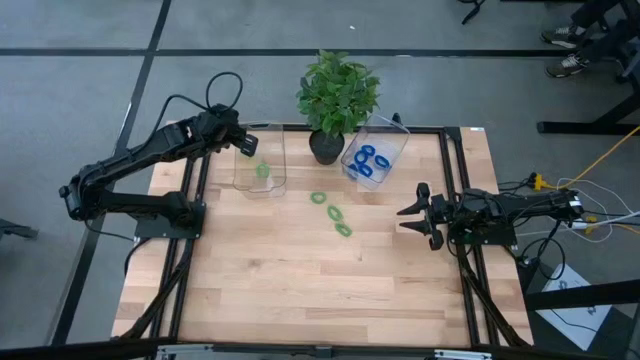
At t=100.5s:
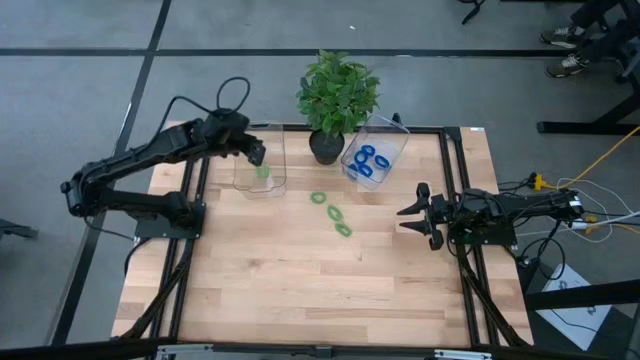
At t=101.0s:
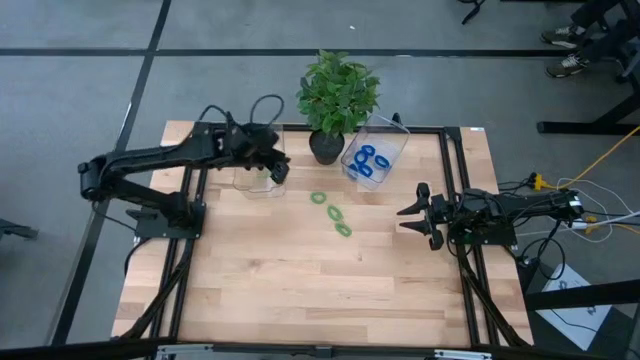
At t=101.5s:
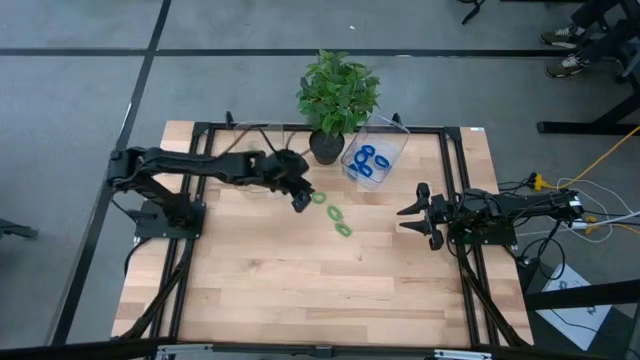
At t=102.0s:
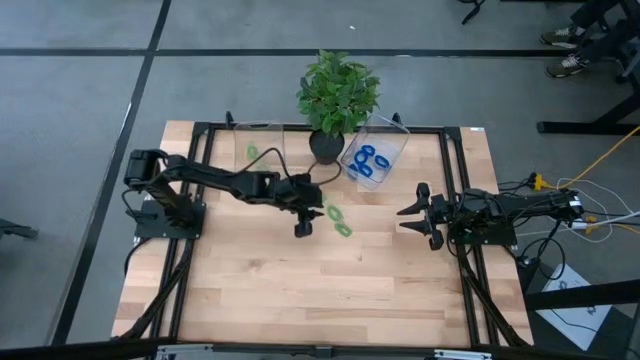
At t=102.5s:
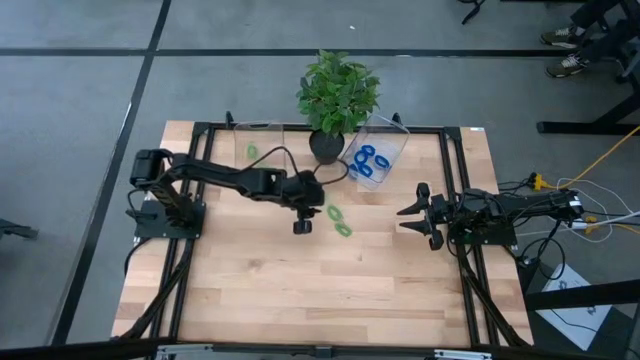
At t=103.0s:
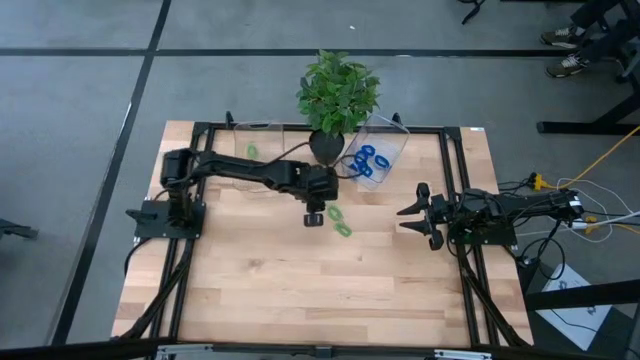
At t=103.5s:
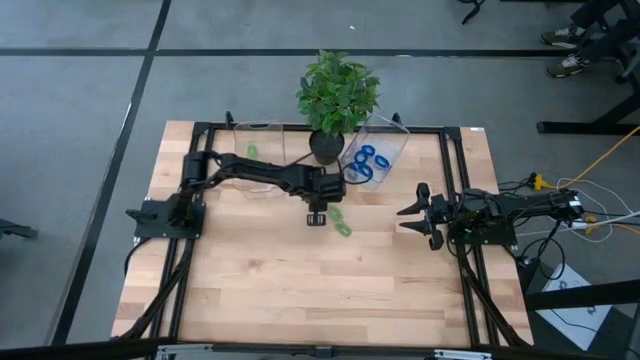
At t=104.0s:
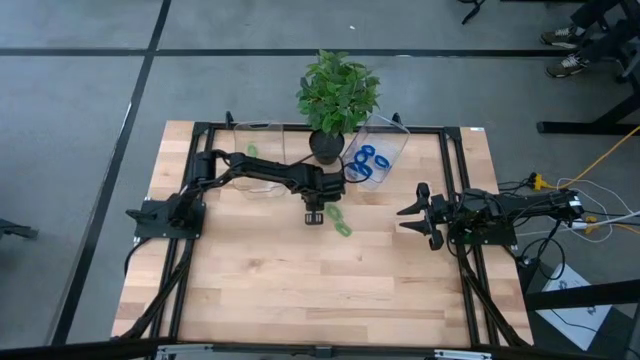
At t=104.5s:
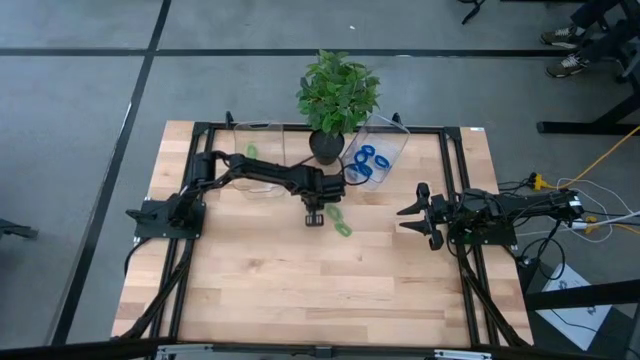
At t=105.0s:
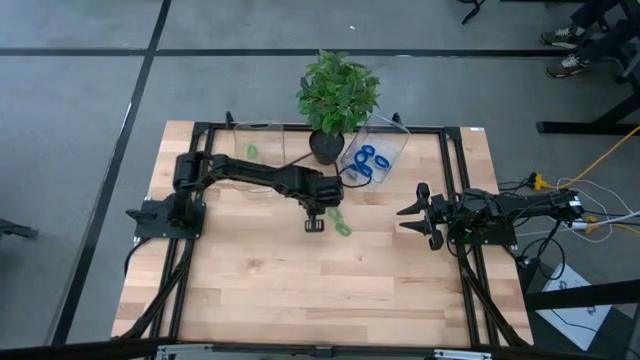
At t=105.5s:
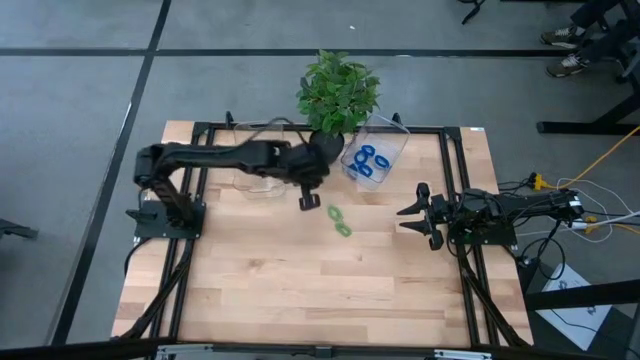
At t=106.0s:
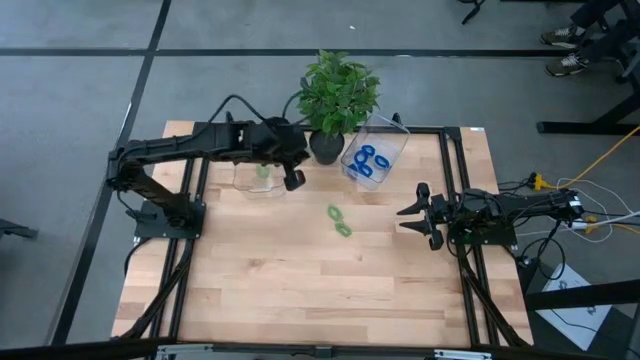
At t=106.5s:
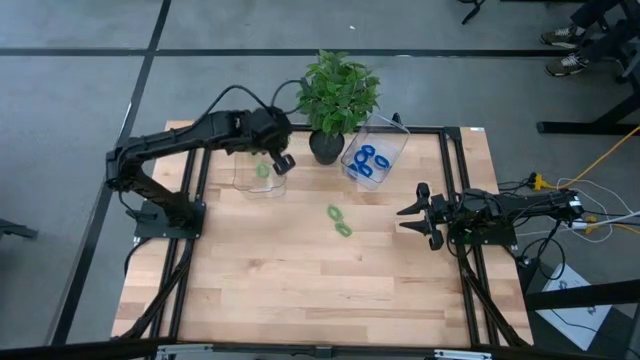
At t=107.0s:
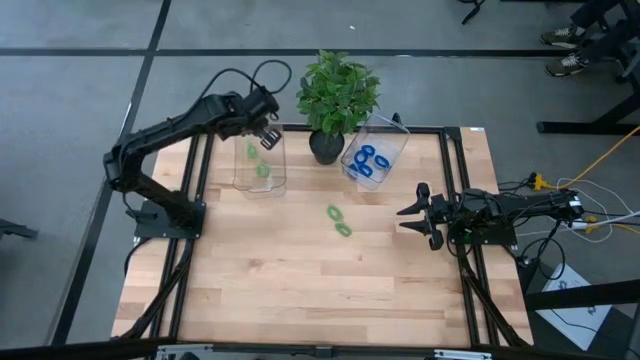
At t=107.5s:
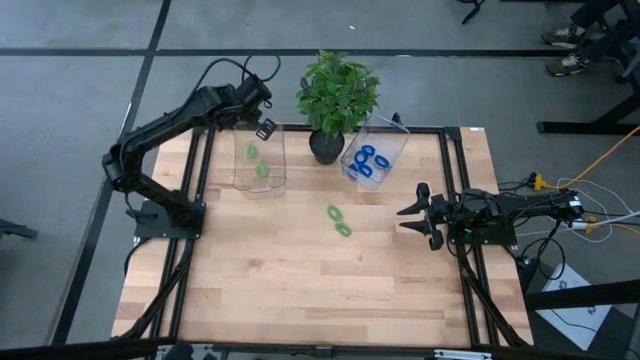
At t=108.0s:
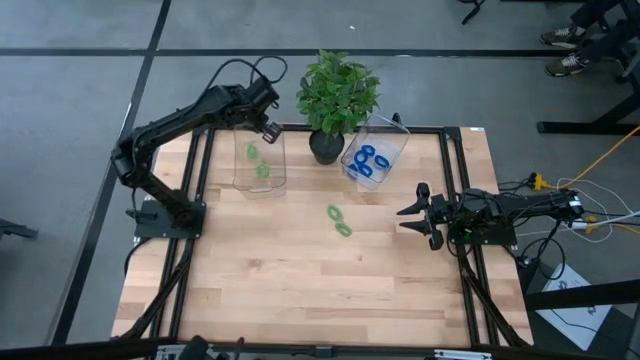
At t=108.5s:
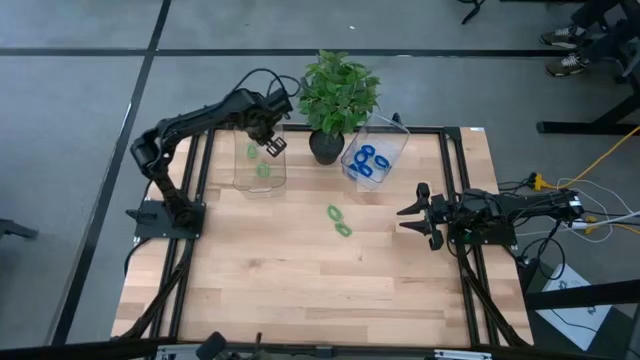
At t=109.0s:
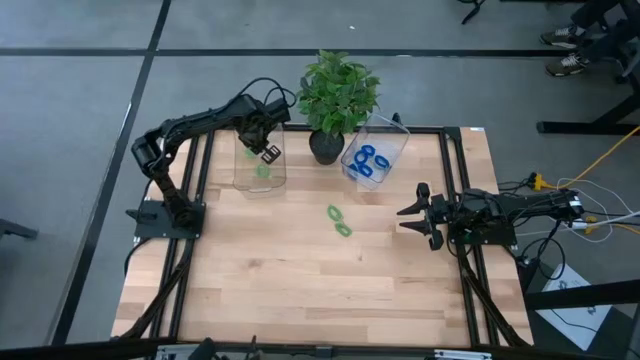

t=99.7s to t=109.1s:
Task: Sort spring keychains
Put the green spring keychain into the left transparent bin

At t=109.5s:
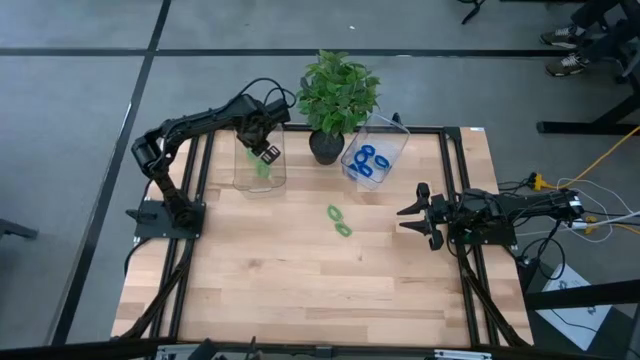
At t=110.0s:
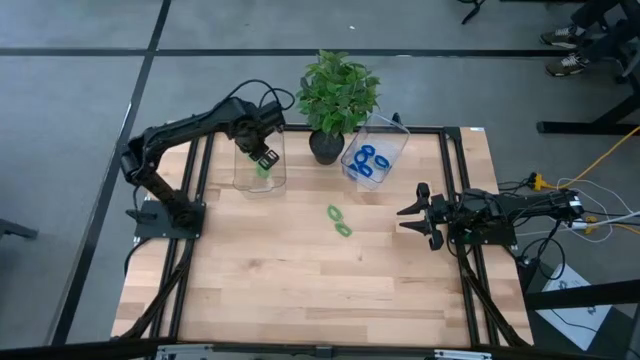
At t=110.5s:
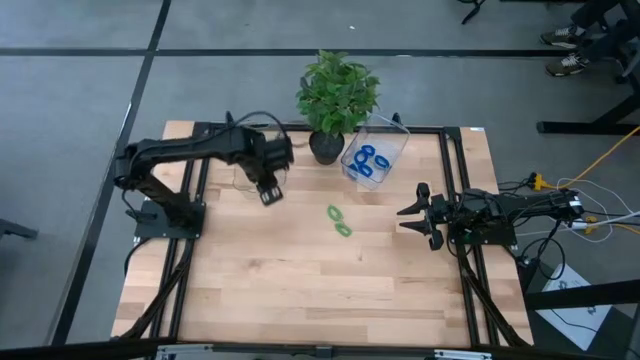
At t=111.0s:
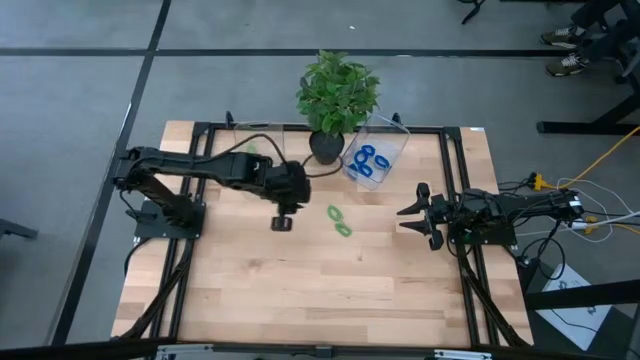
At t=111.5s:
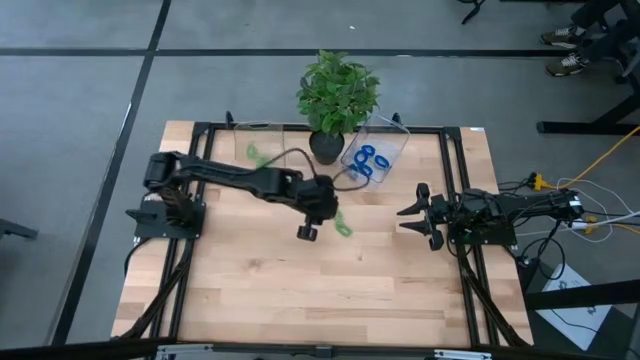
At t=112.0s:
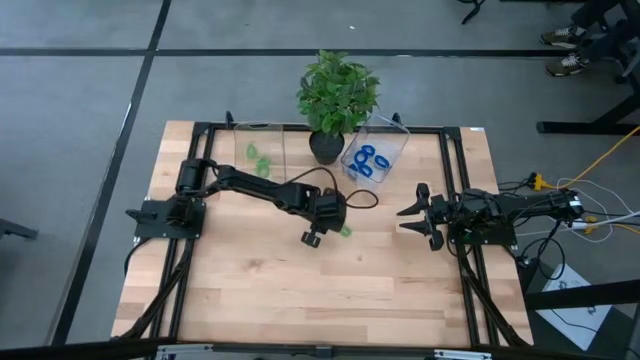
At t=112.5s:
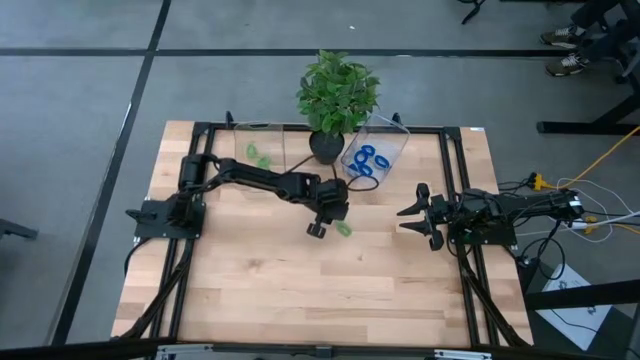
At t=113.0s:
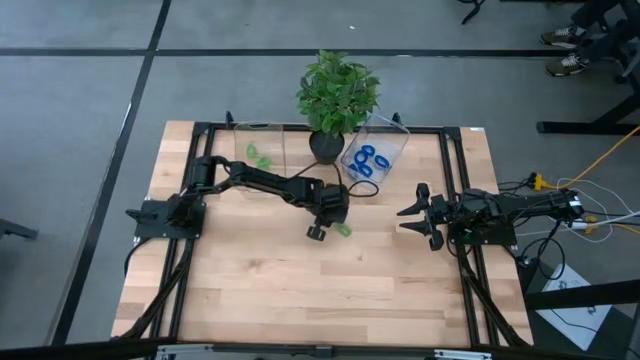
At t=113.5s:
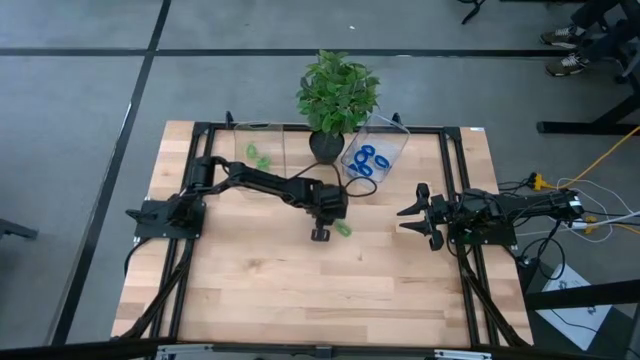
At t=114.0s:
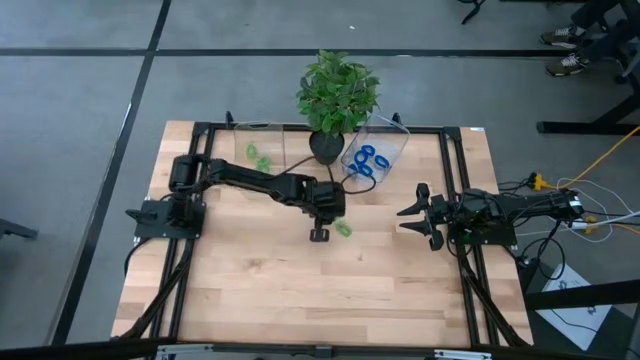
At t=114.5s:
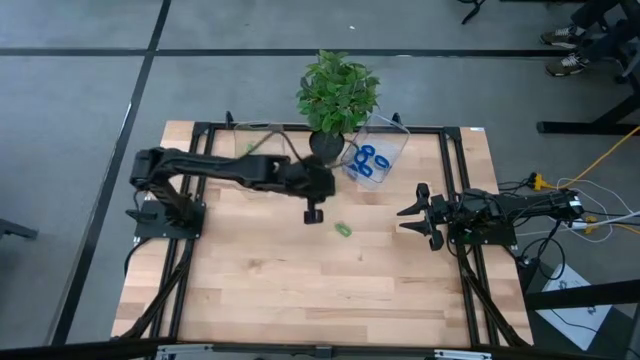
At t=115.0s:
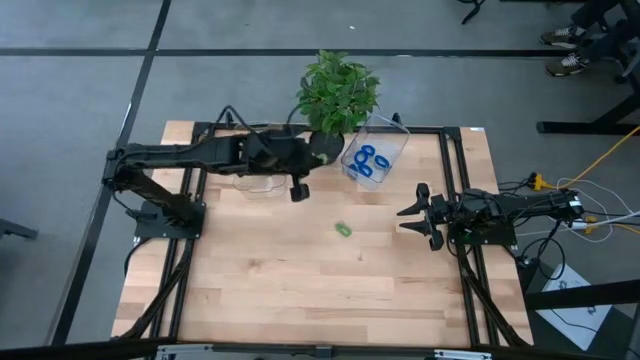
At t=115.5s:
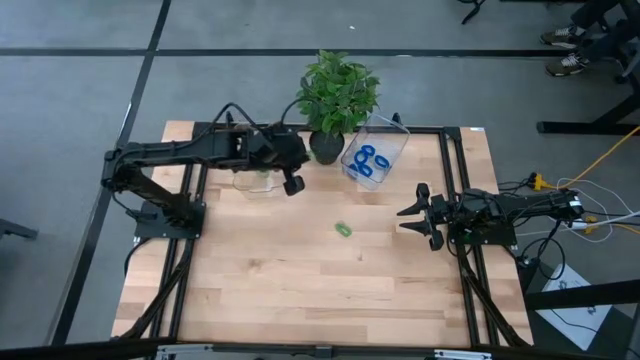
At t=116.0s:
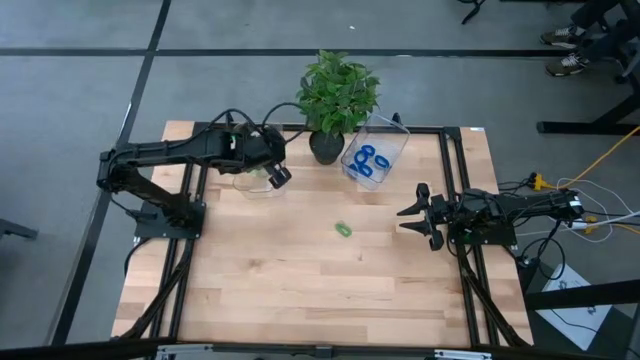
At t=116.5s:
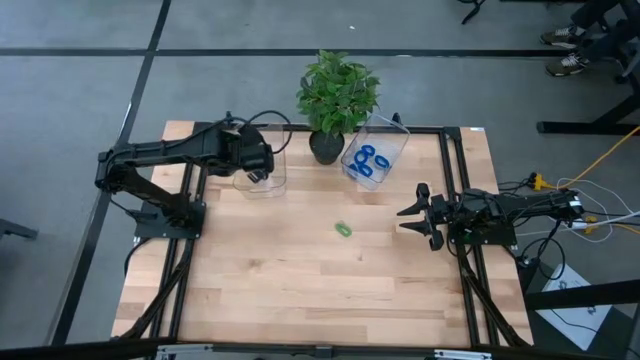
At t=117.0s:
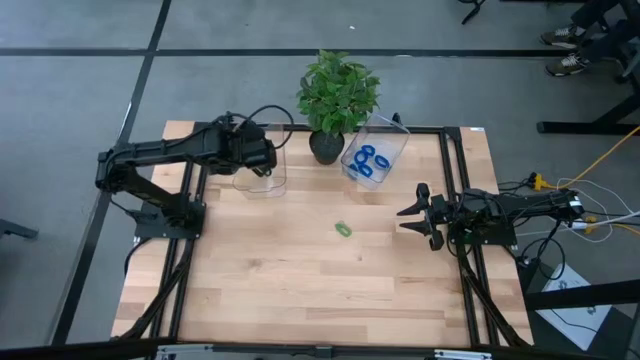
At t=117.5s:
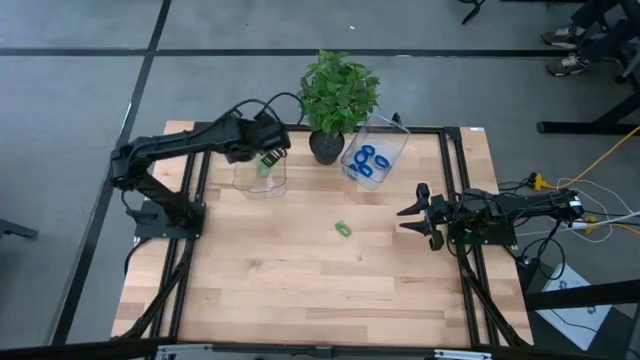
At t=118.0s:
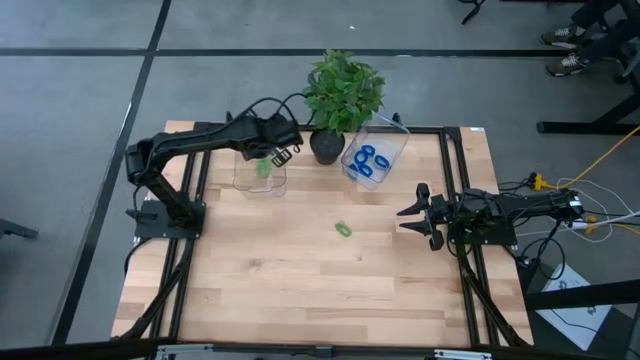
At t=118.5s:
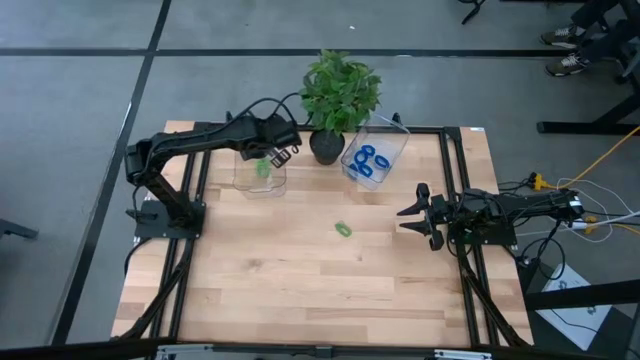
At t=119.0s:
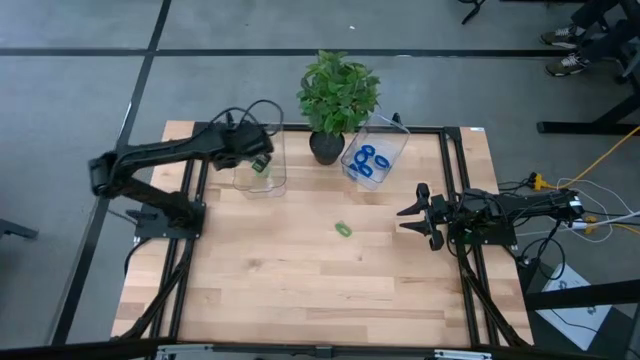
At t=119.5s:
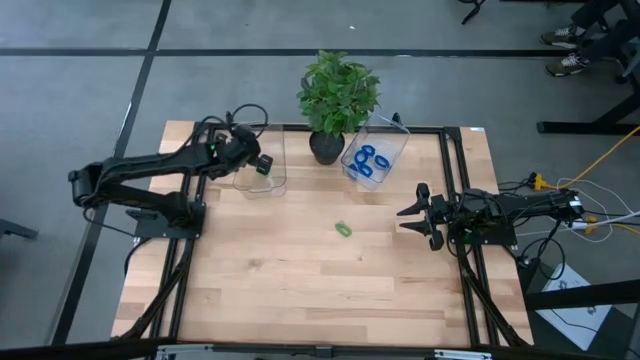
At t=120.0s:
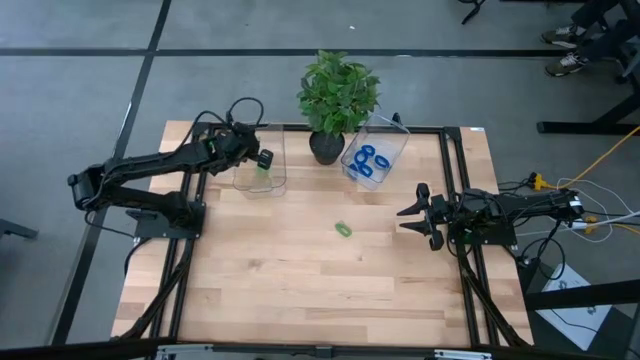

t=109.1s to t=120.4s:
Put the green spring keychain into the left transparent bin
